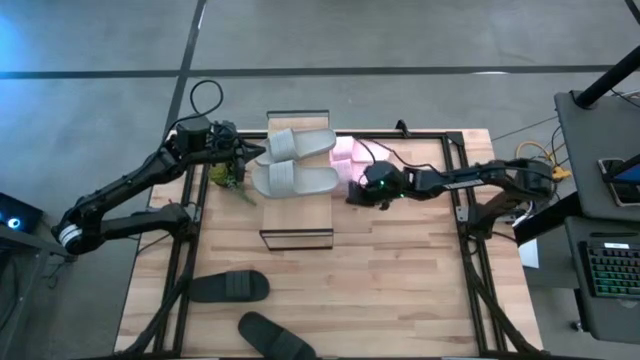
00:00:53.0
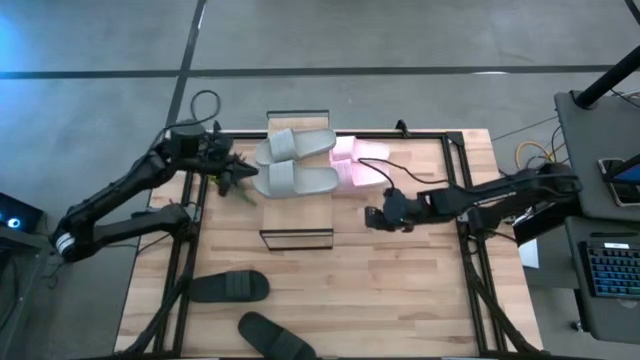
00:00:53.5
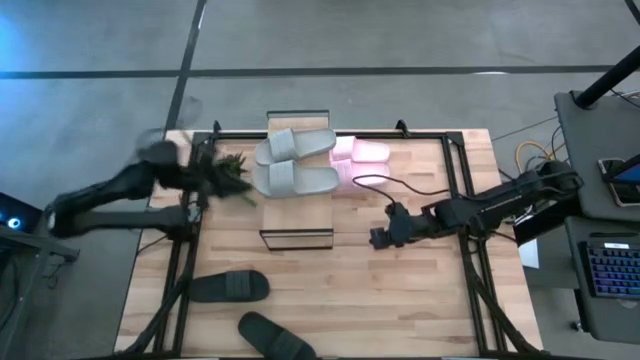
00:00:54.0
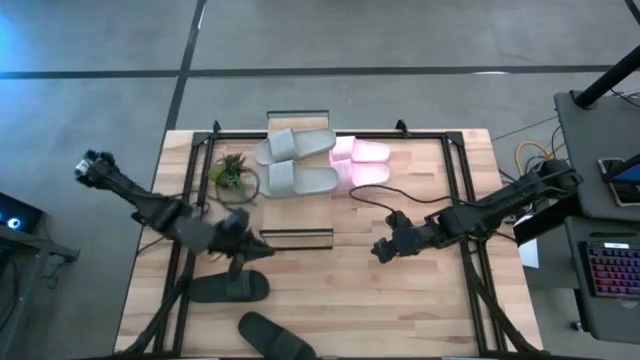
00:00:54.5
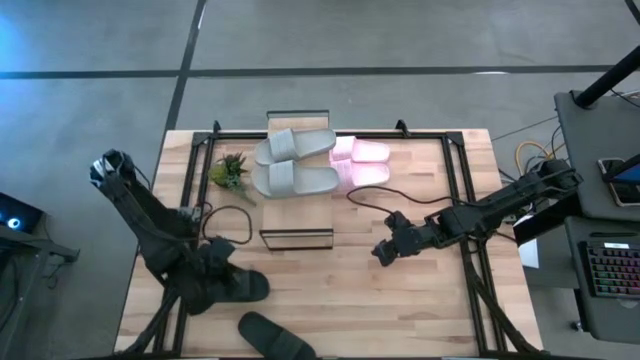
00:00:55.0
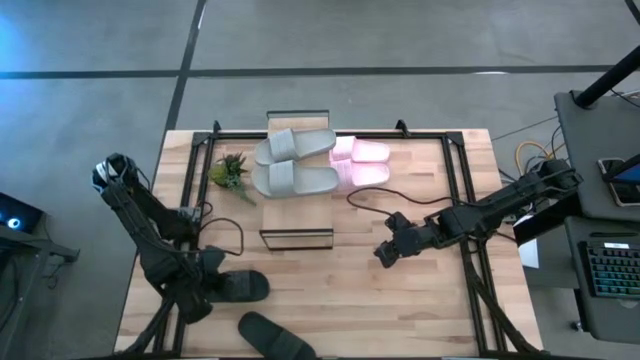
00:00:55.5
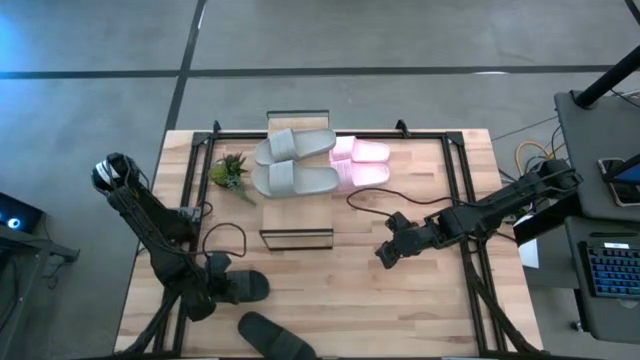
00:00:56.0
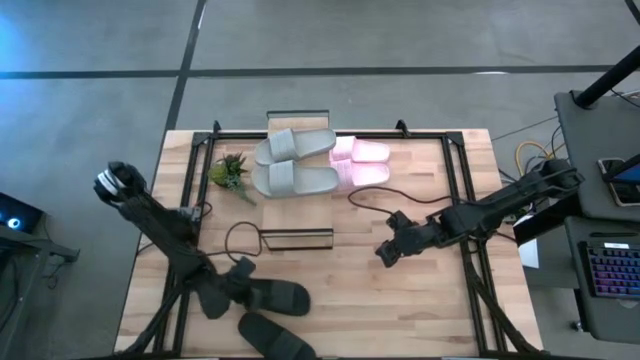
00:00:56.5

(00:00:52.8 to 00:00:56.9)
Task: Pick and place slides into the shelf
Move the top black slide to the middle of the table

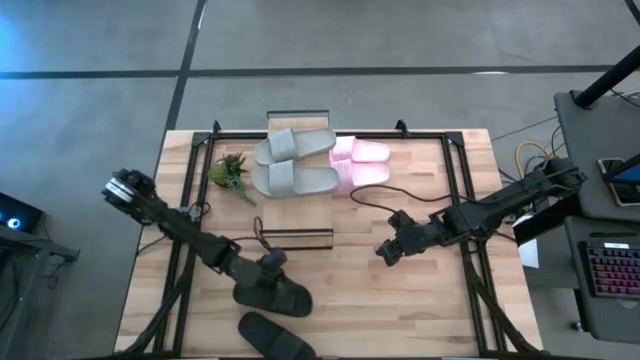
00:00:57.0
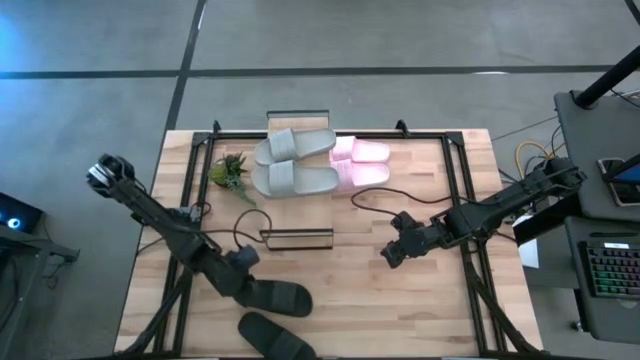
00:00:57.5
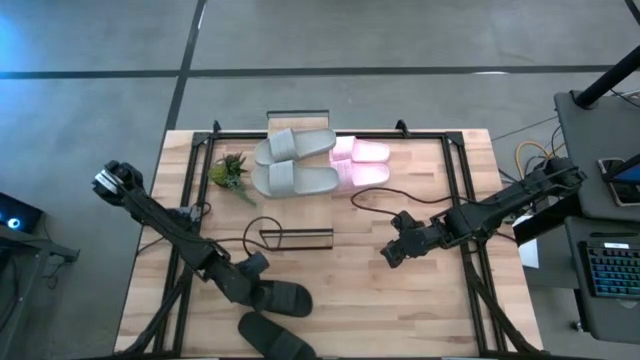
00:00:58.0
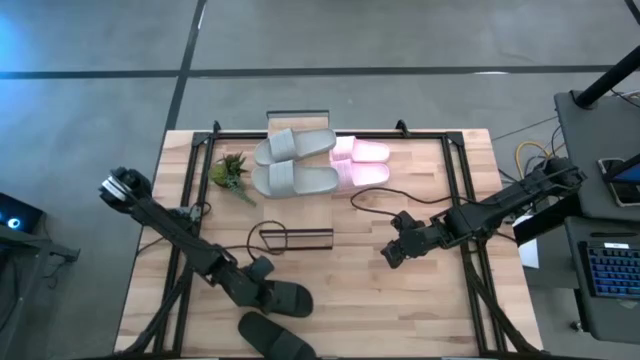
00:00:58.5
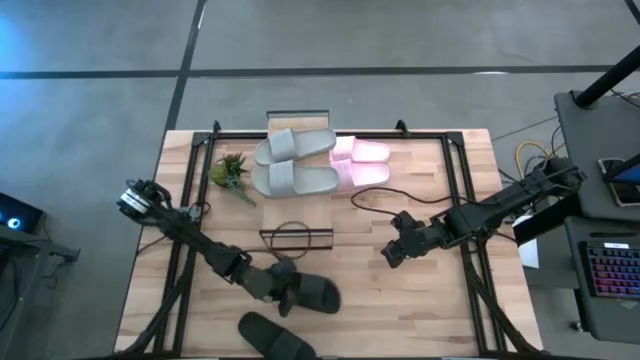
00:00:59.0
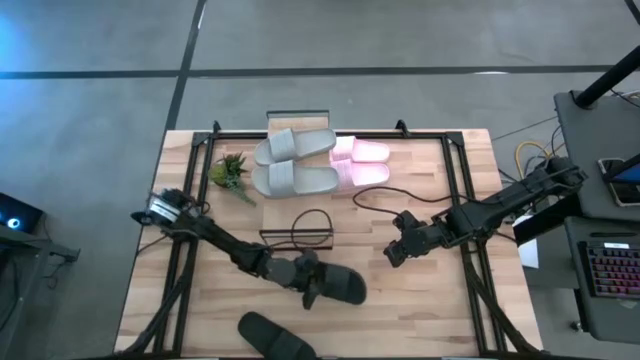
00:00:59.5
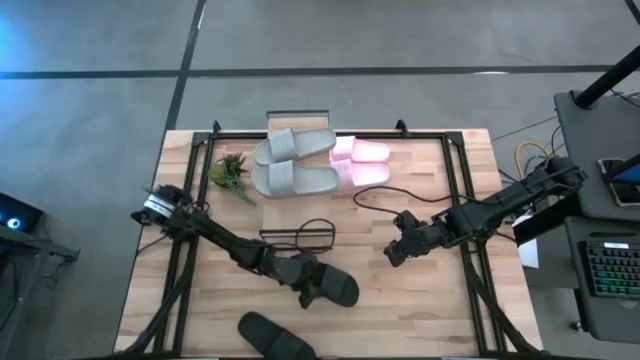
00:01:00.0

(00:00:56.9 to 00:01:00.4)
Move the top black slide to the middle of the table

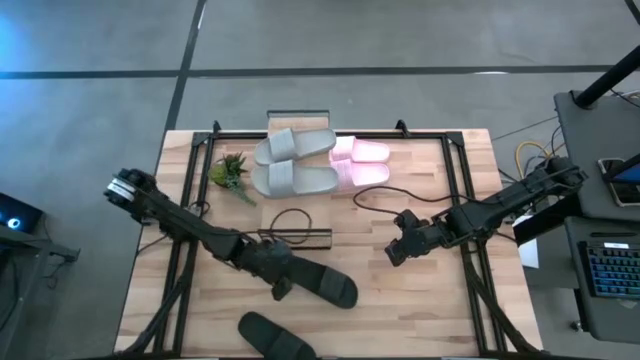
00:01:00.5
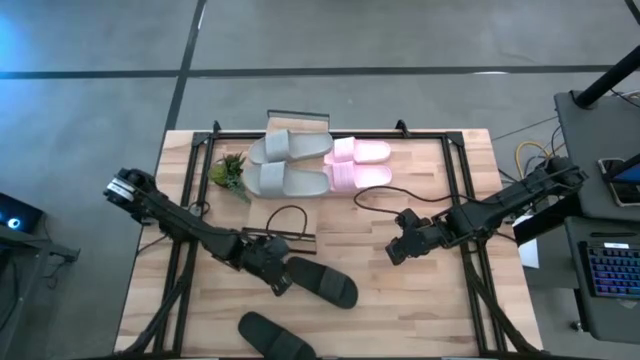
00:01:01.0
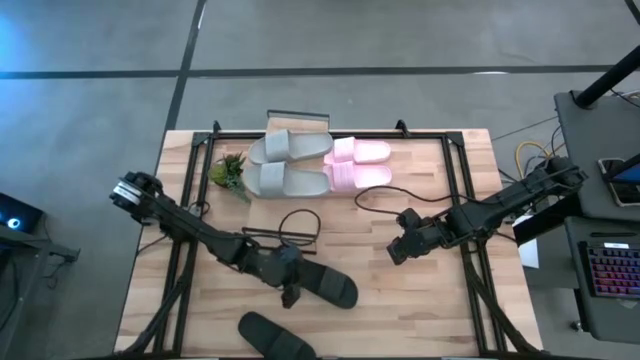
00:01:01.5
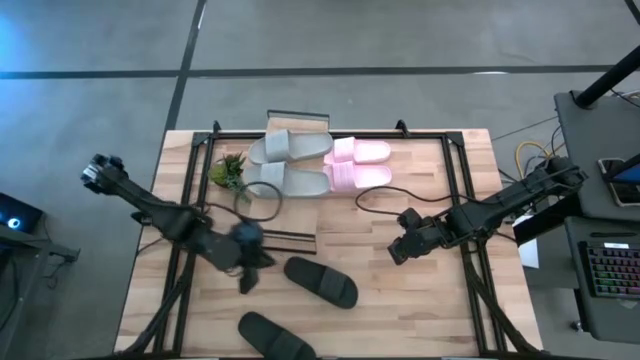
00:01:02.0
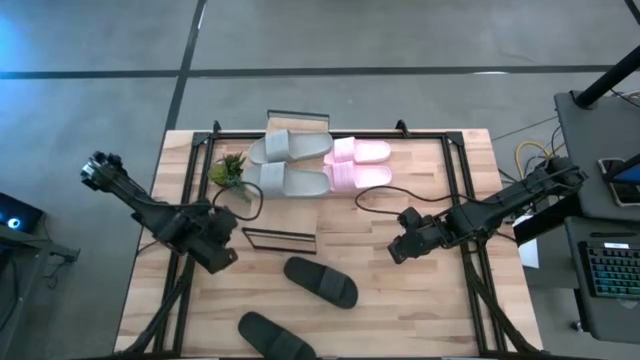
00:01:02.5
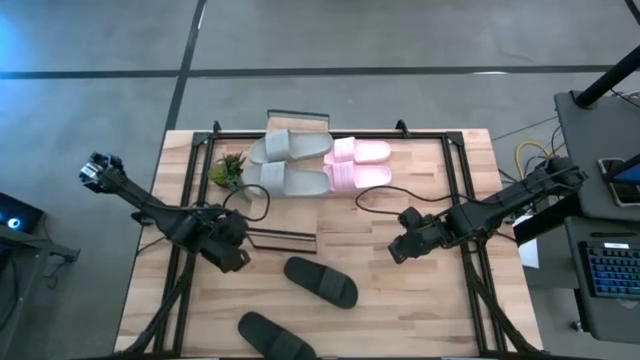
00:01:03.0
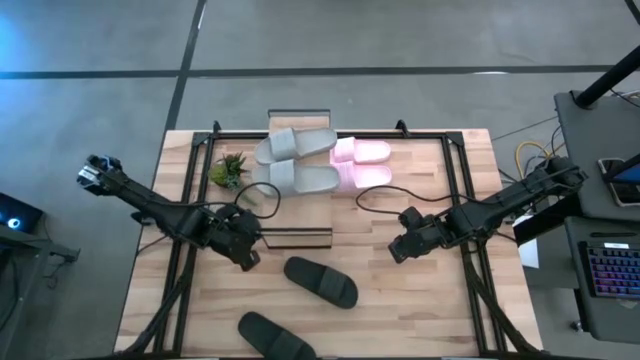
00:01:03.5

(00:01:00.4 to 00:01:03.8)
Adjust the the shelf on the table

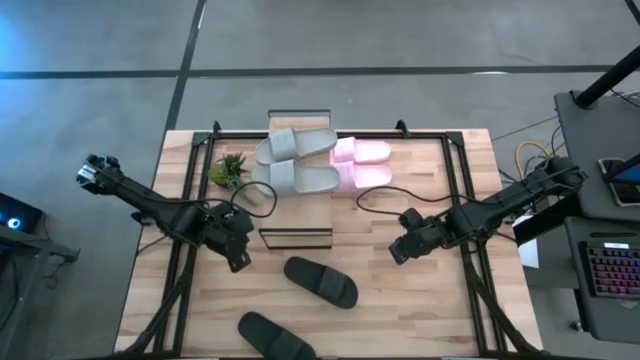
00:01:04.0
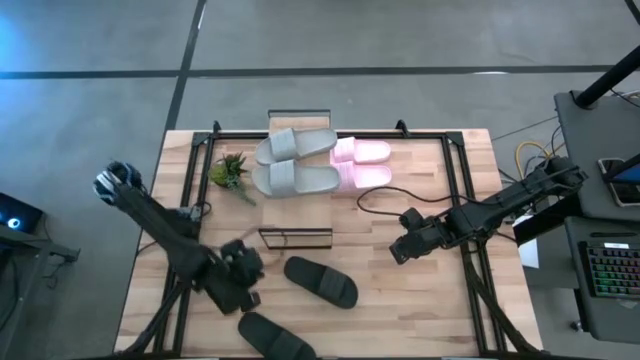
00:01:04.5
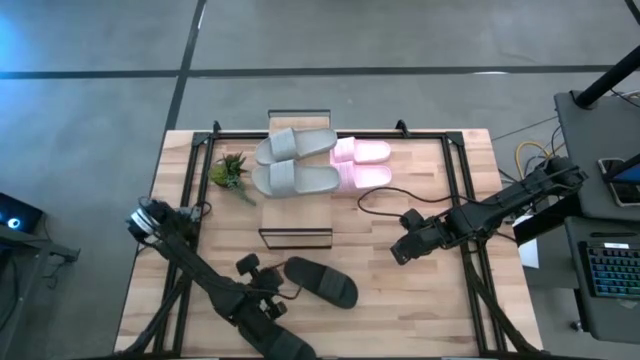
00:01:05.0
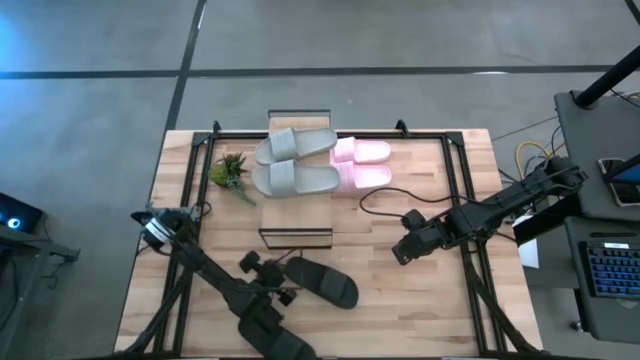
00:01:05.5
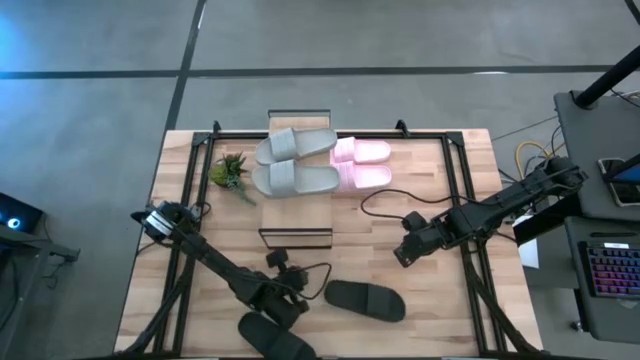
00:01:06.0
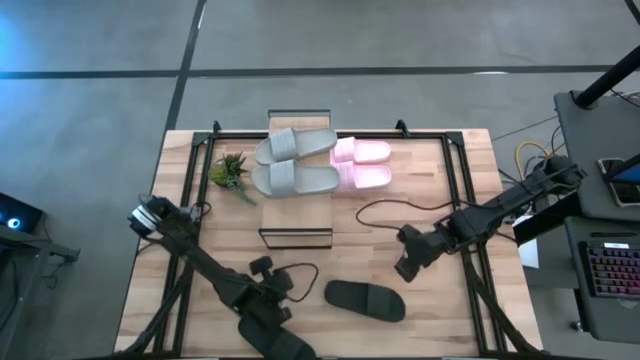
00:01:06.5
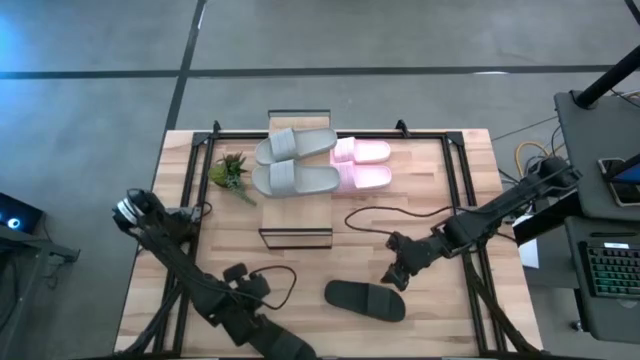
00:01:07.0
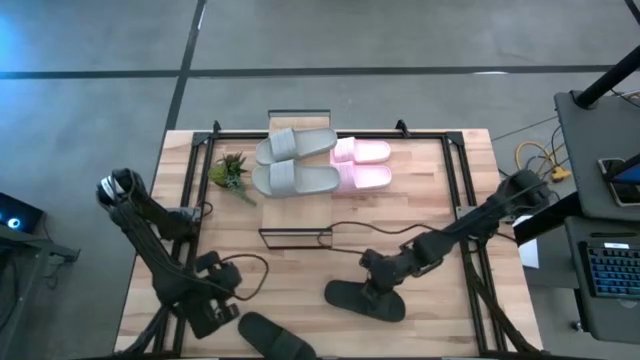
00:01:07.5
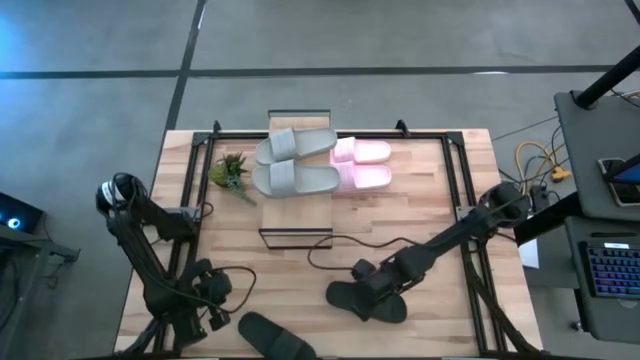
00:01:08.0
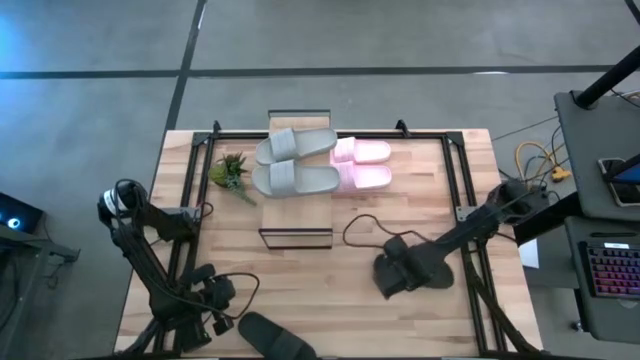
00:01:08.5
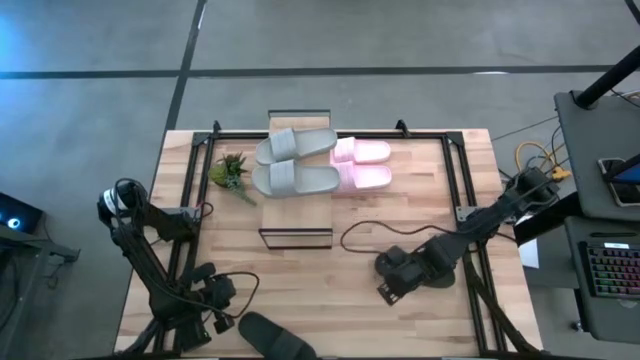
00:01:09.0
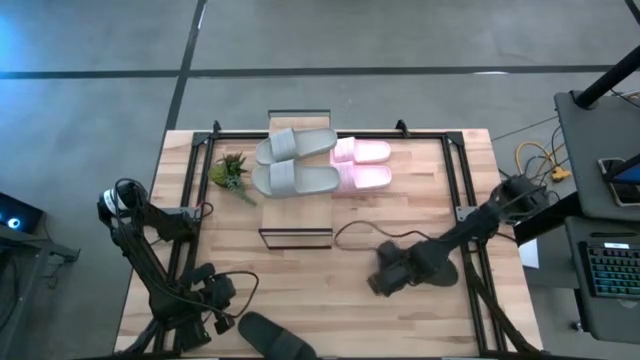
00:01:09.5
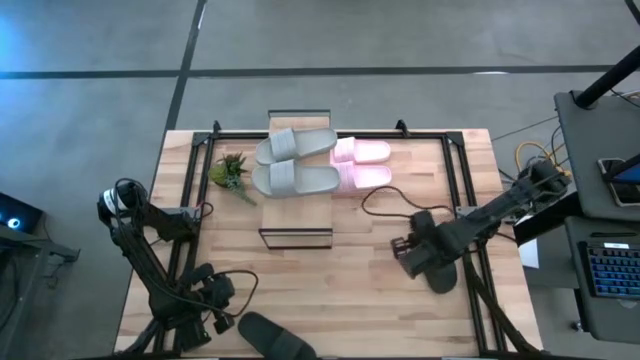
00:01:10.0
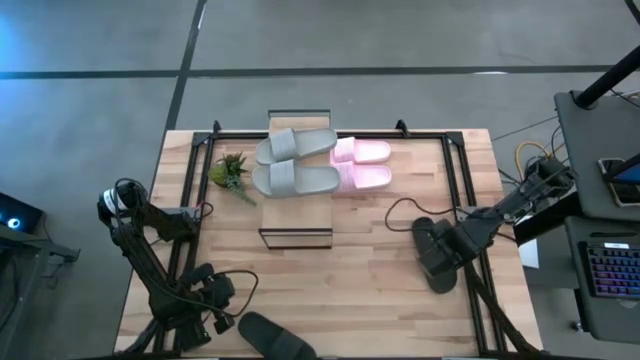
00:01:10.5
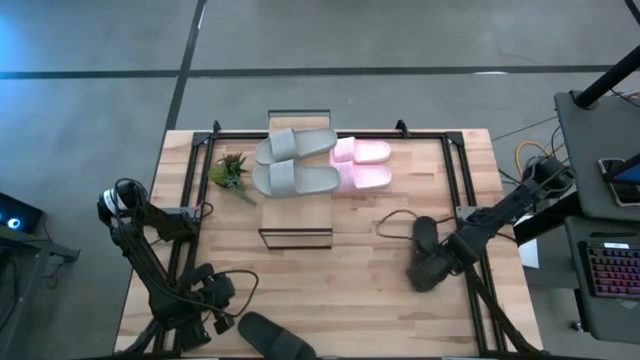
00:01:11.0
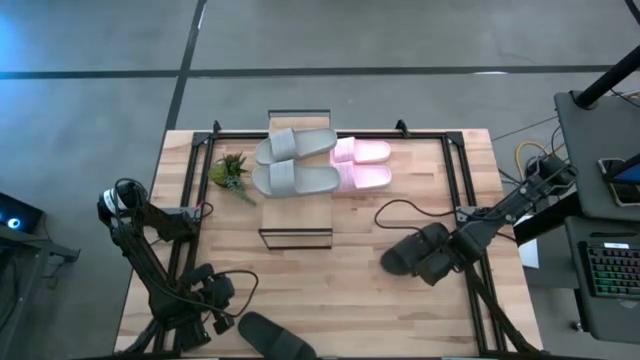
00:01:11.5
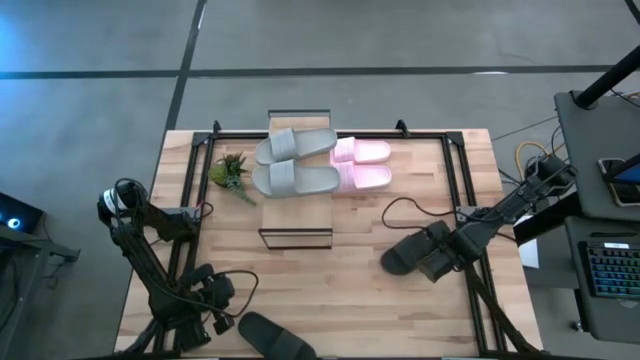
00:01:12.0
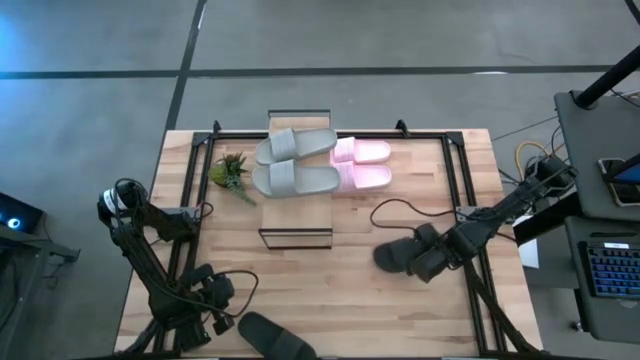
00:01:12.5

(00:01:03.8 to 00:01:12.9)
Move the top black slide to the middle right of the table

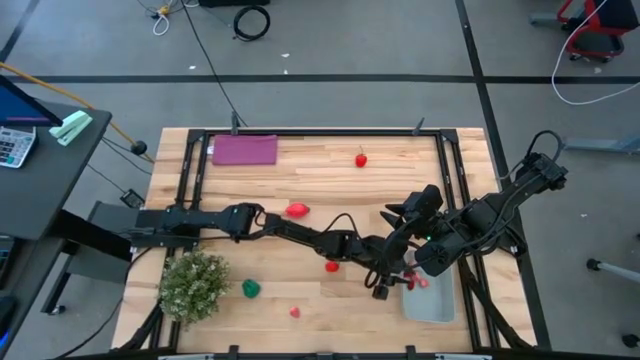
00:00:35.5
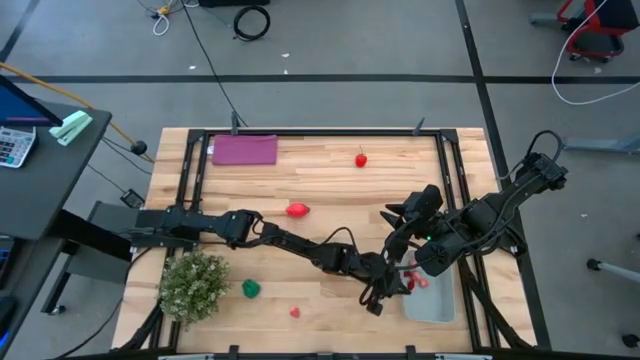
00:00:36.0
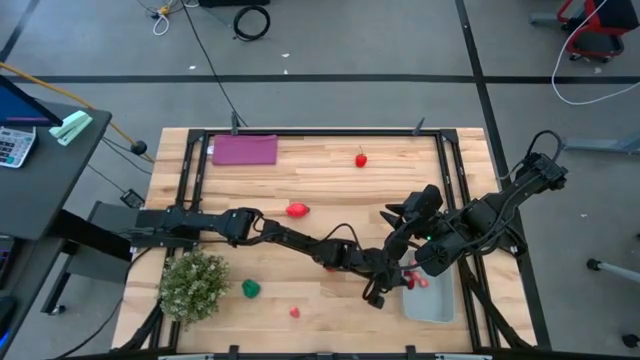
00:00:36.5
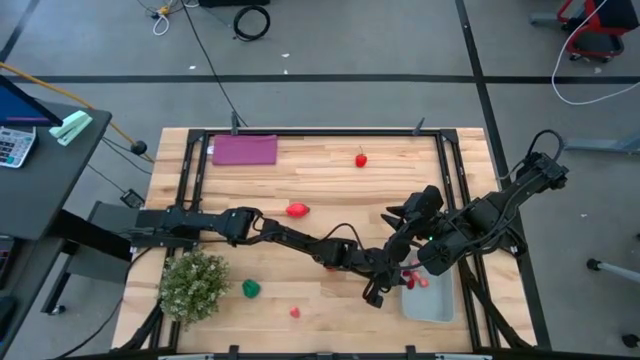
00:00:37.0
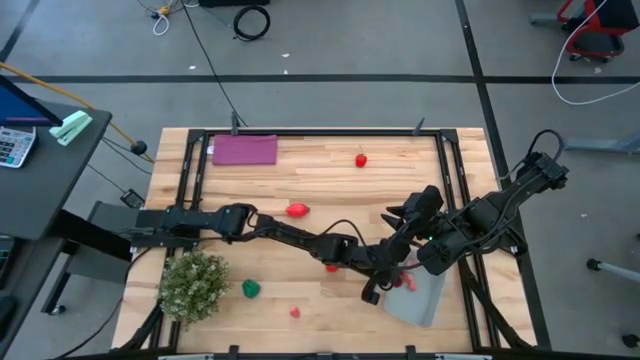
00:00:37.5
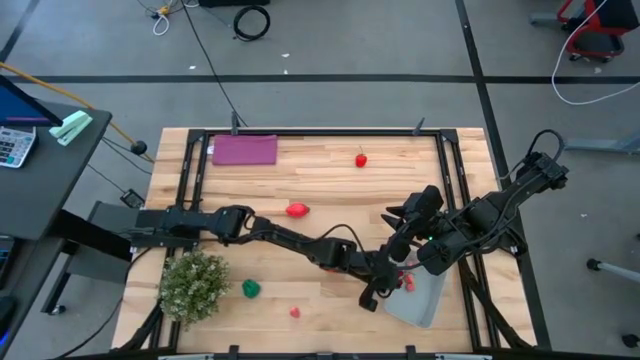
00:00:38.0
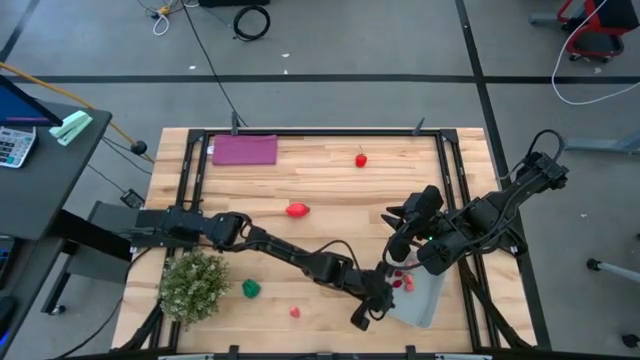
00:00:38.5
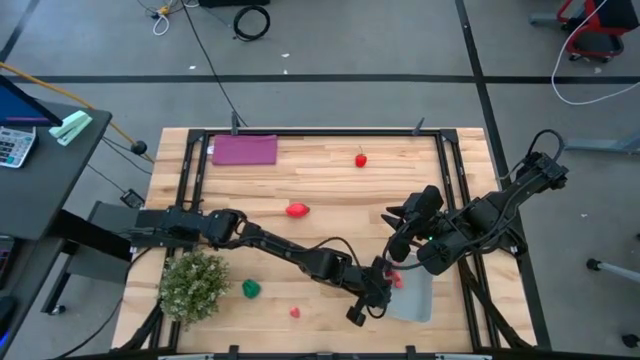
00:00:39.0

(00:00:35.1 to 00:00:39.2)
Task: Pick and placing Produce into tupperware
Adjust the gray bin on the table
